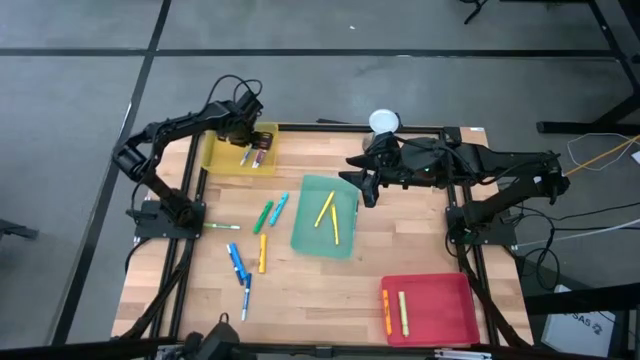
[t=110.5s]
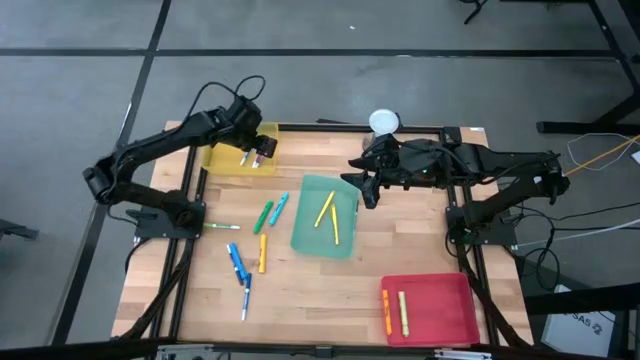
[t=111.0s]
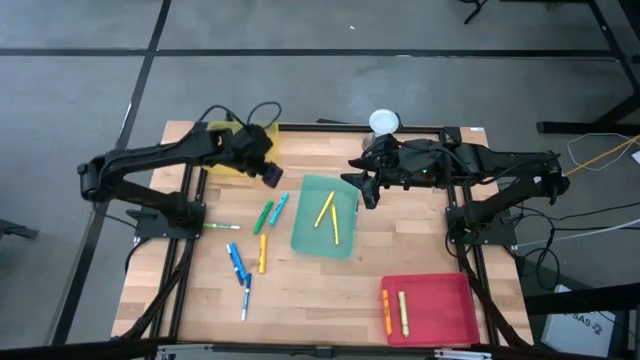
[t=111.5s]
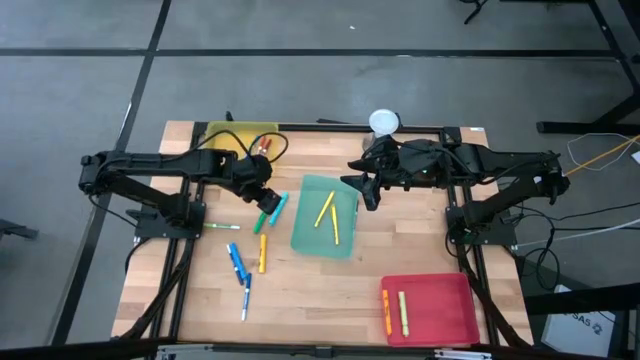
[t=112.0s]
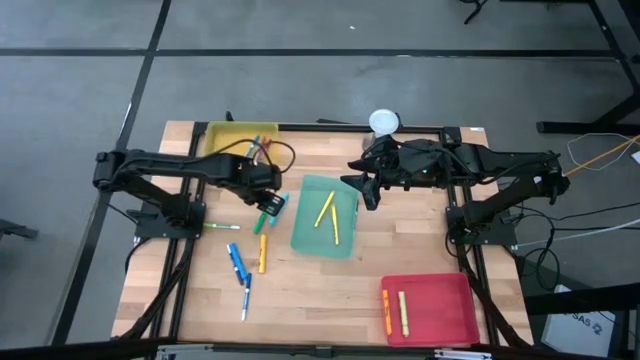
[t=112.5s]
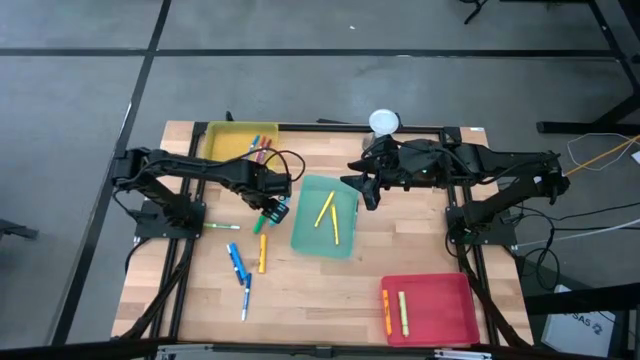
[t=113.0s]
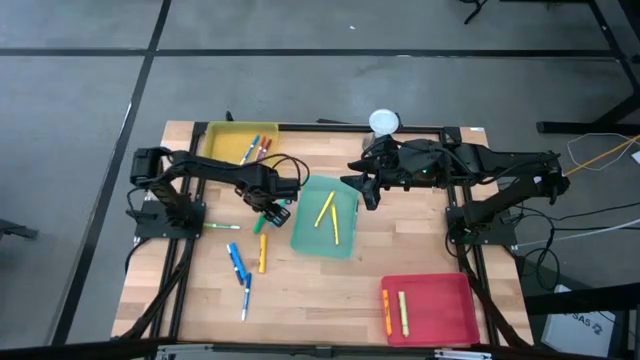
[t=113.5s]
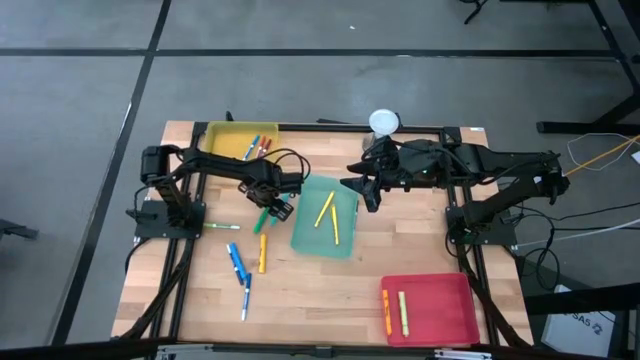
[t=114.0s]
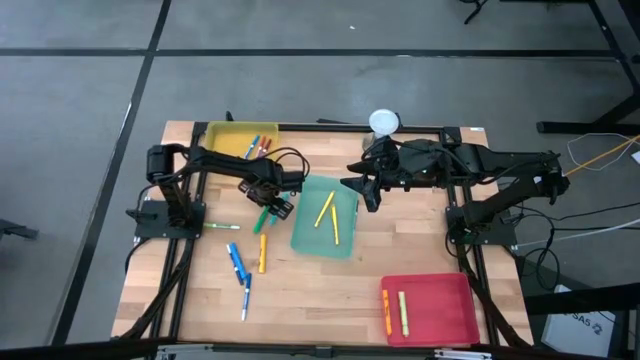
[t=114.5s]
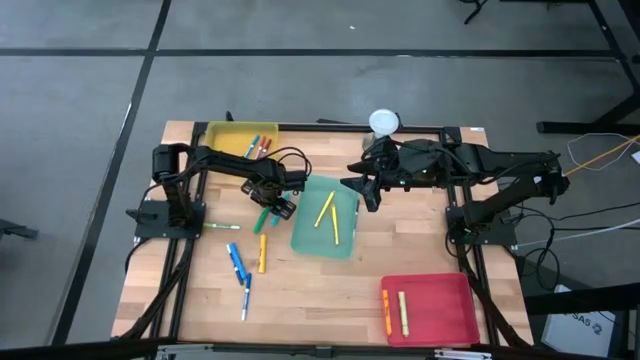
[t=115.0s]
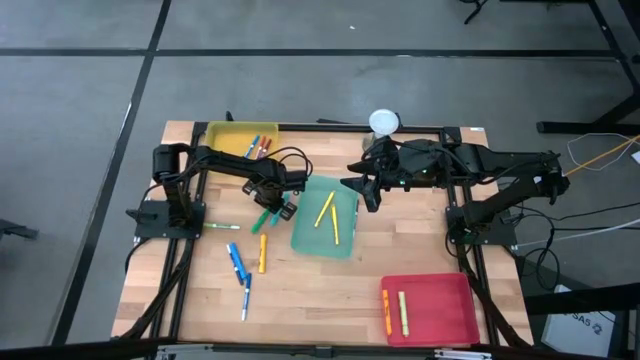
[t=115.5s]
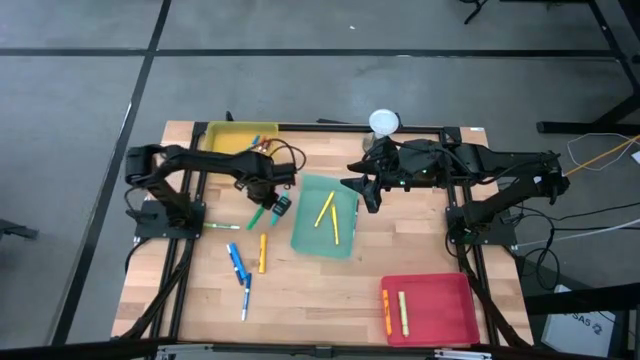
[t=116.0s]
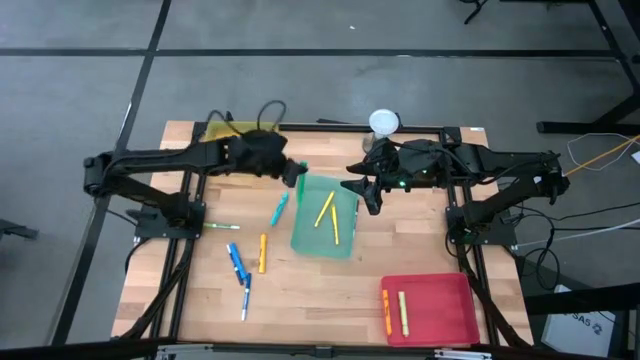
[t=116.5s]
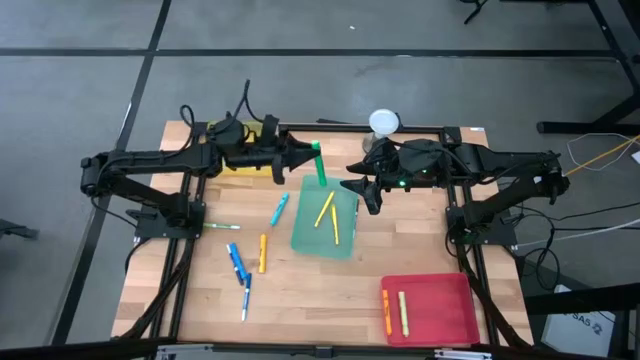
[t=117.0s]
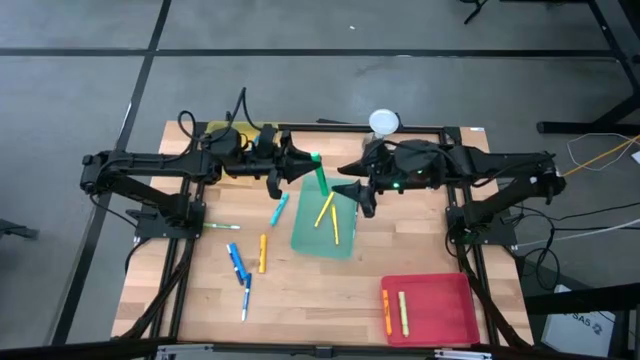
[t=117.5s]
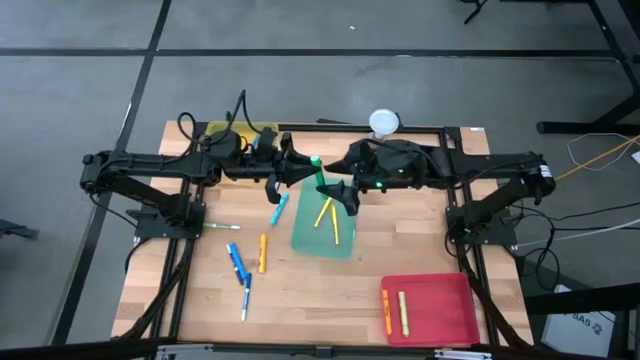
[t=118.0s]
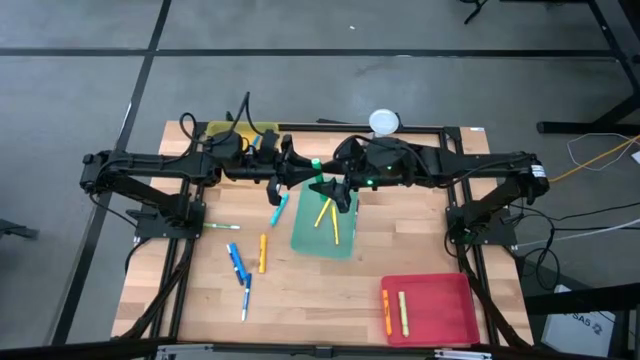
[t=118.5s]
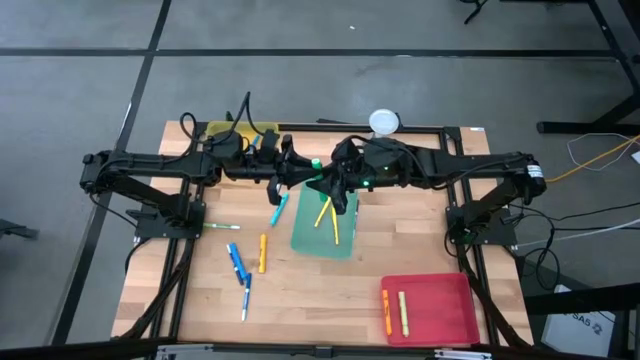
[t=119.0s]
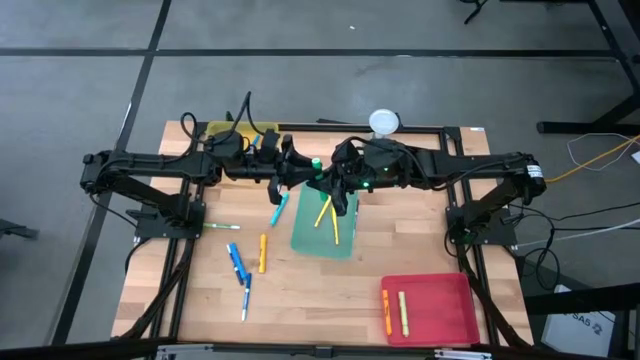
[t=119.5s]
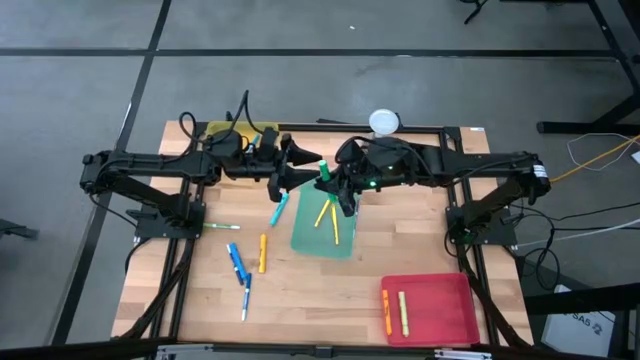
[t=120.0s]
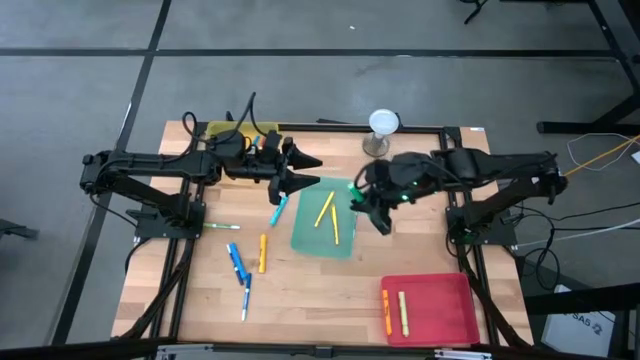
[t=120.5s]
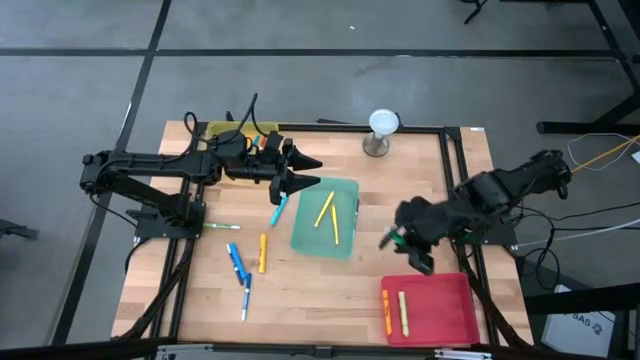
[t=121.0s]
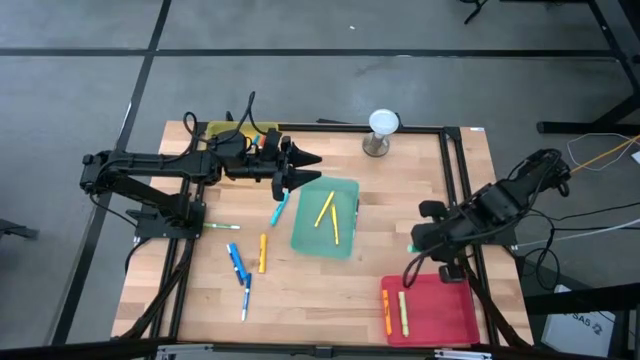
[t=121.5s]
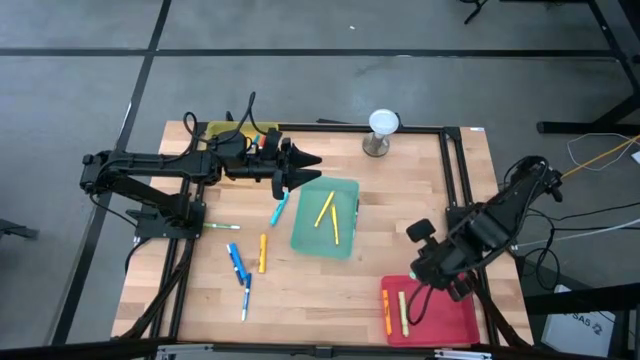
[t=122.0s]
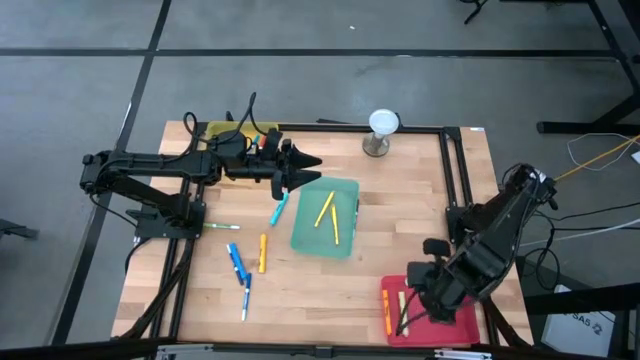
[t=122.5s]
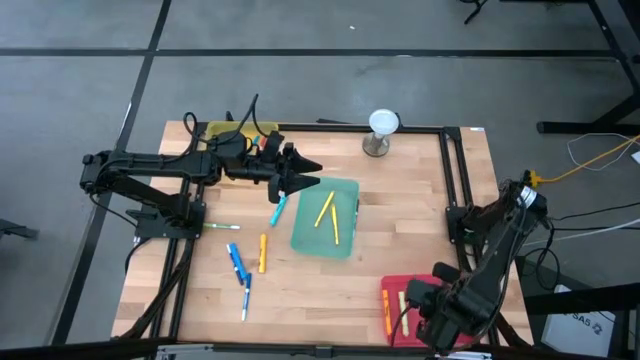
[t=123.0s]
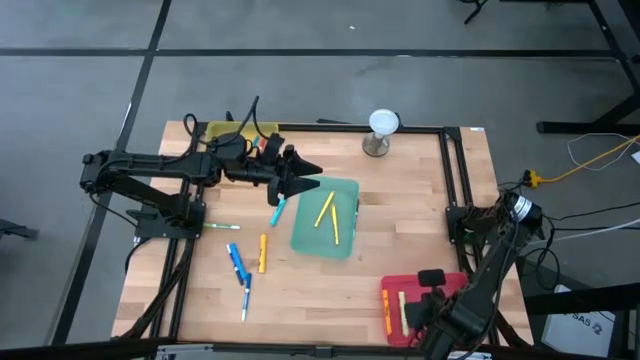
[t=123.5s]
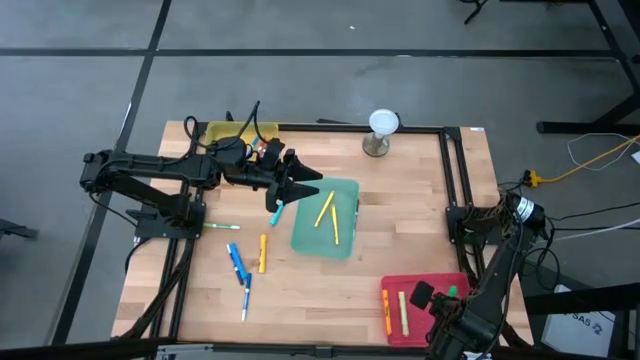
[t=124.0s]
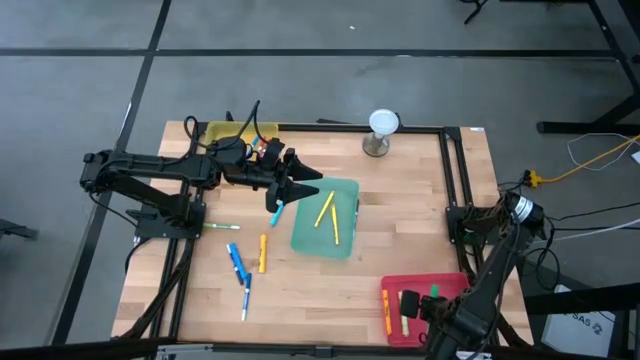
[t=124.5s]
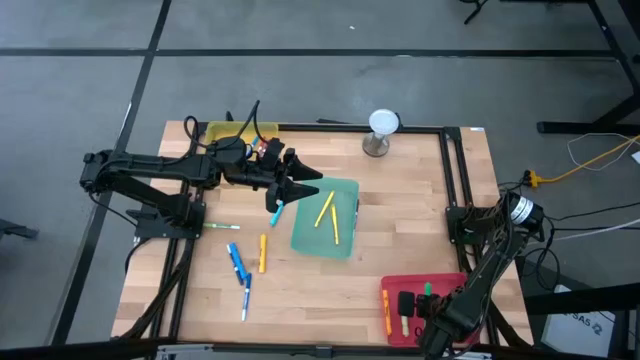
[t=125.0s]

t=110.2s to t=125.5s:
Task: Pick & Place Markers
Put the green highlighter pen into the pink bin

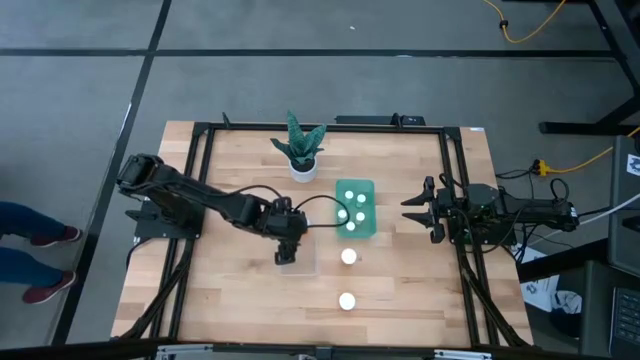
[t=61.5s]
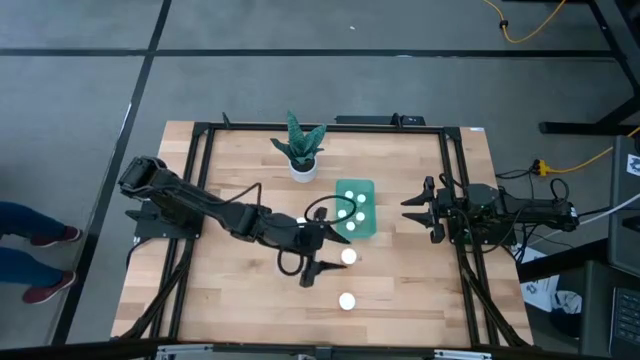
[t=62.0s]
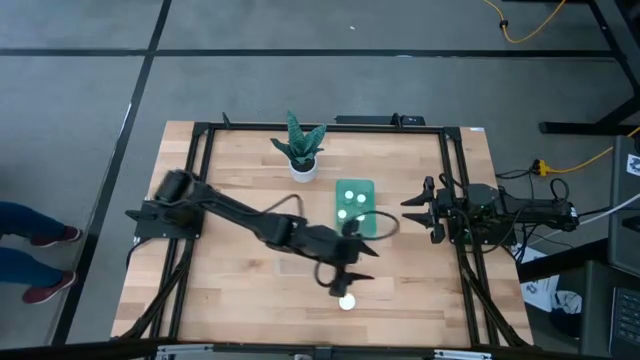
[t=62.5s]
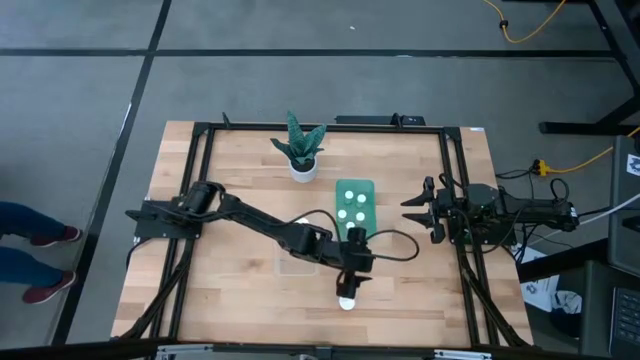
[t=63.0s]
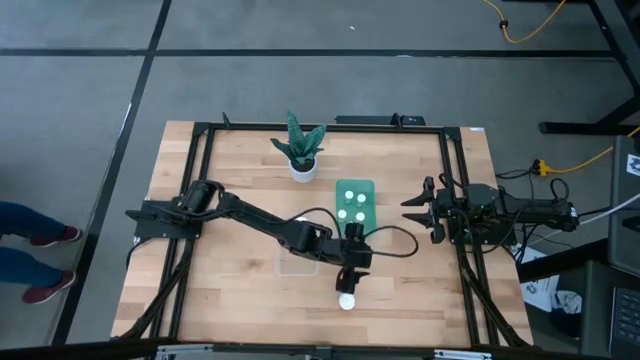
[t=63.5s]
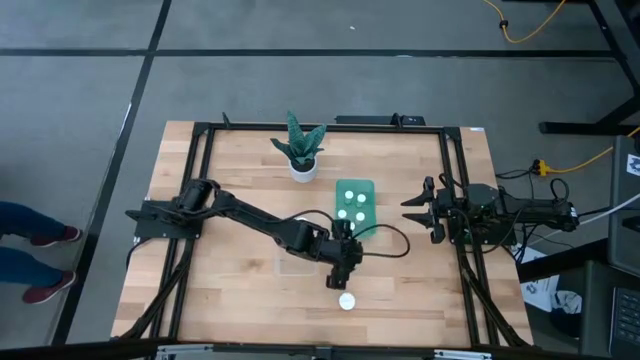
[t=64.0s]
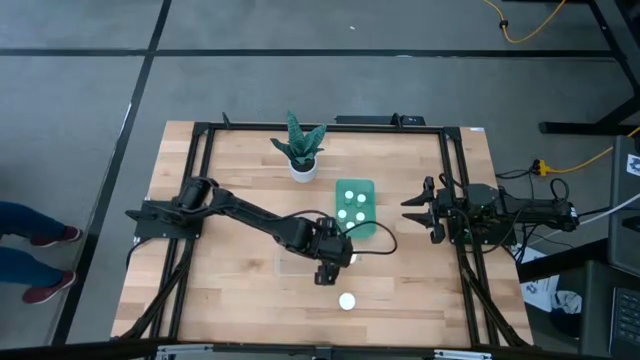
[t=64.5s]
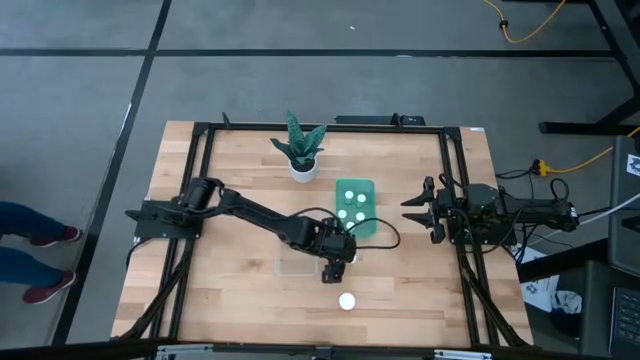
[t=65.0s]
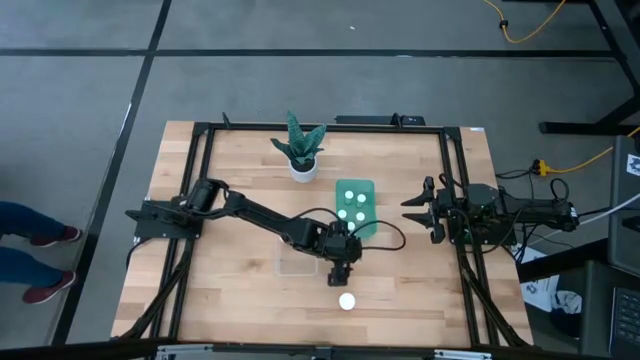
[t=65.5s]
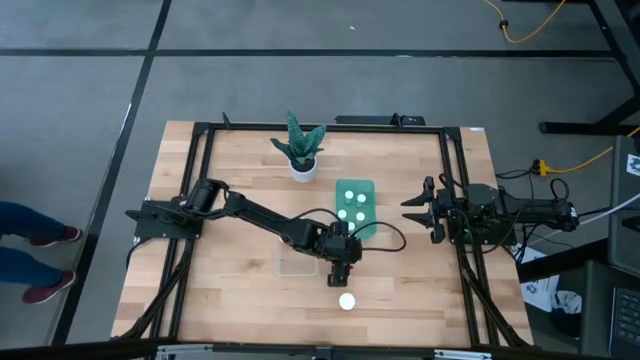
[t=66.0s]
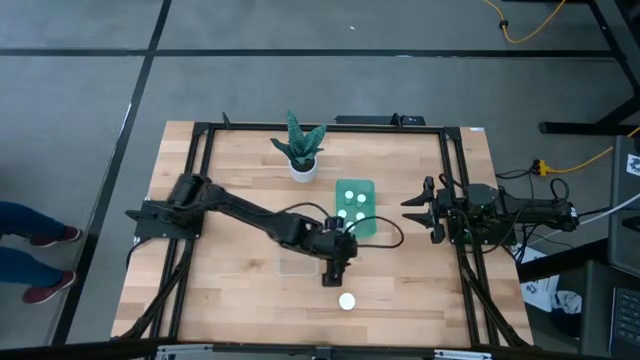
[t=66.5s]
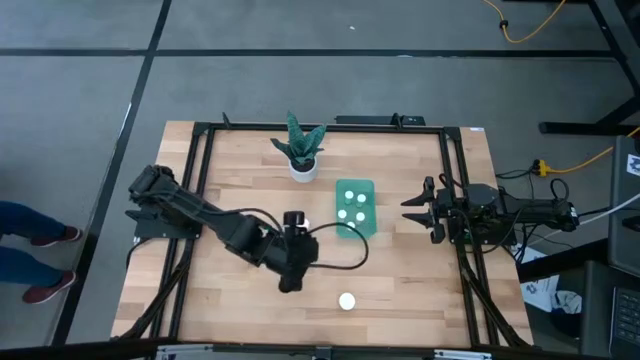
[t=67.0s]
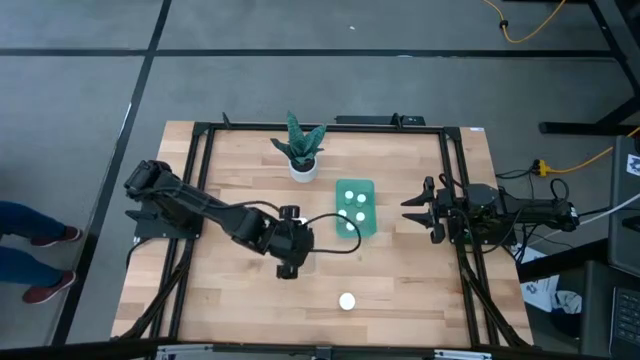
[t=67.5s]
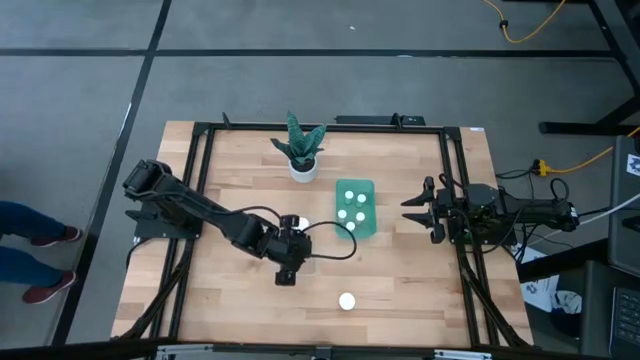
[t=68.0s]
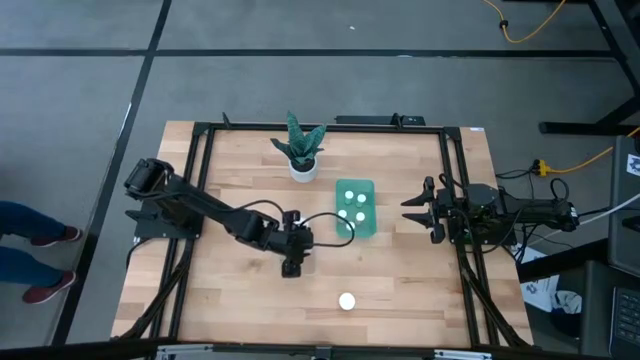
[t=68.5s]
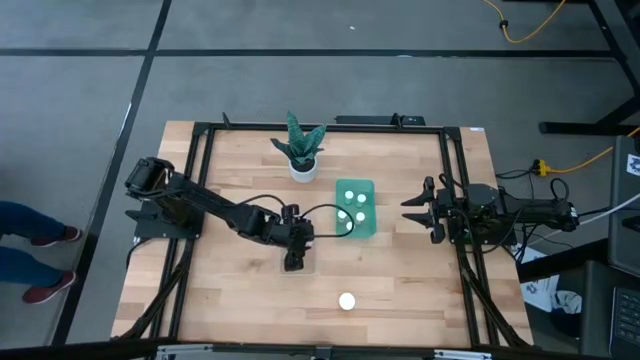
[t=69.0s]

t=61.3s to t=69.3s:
Task: Pick and place medicine bottles into bin by pill shape (circle, oval)
Put the large orange pill bottle into the transparent bin
